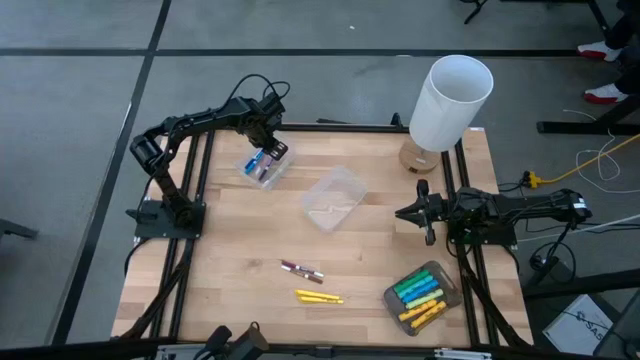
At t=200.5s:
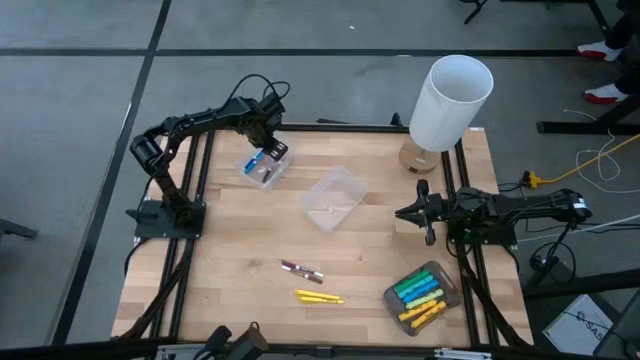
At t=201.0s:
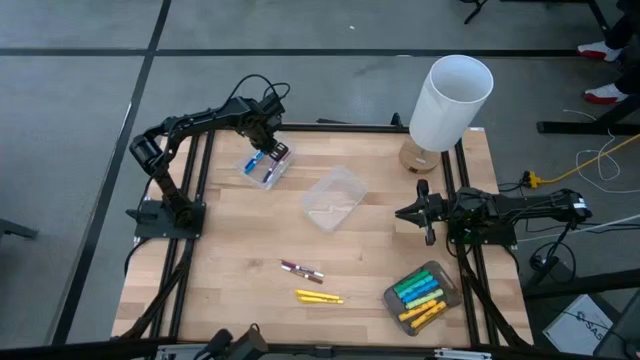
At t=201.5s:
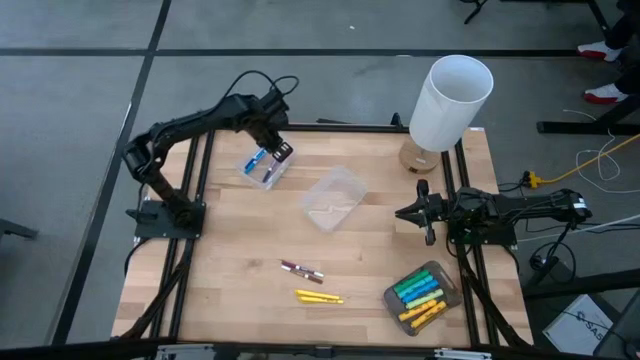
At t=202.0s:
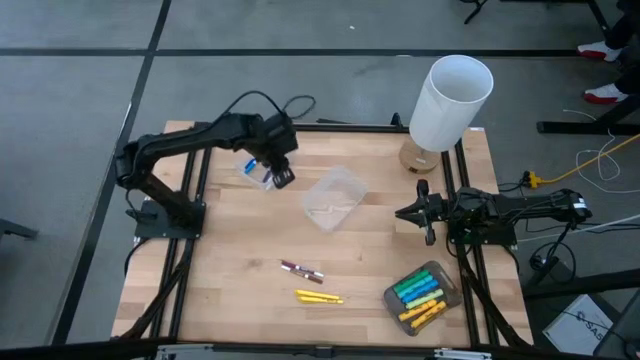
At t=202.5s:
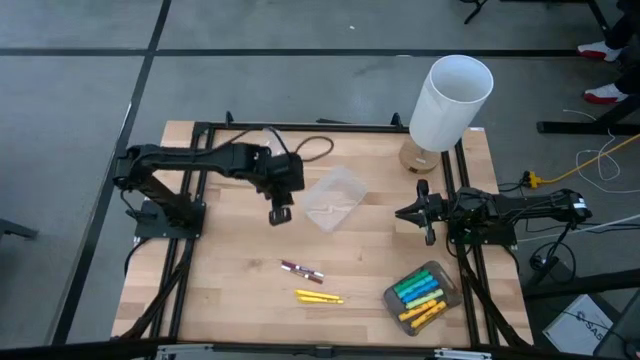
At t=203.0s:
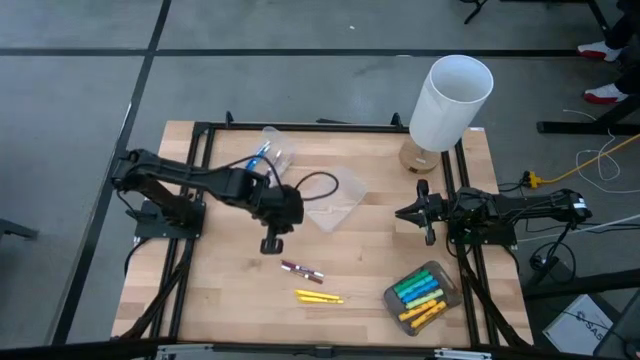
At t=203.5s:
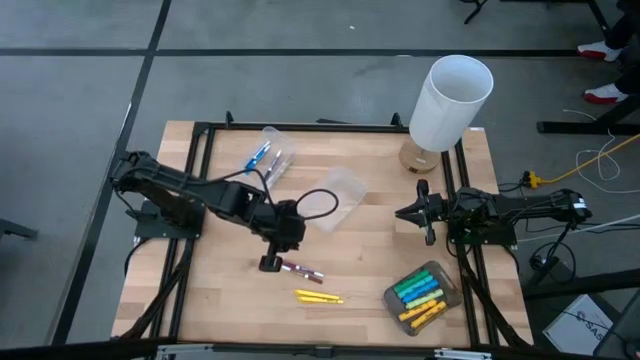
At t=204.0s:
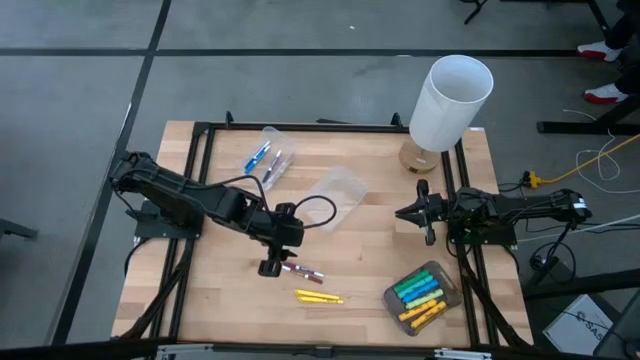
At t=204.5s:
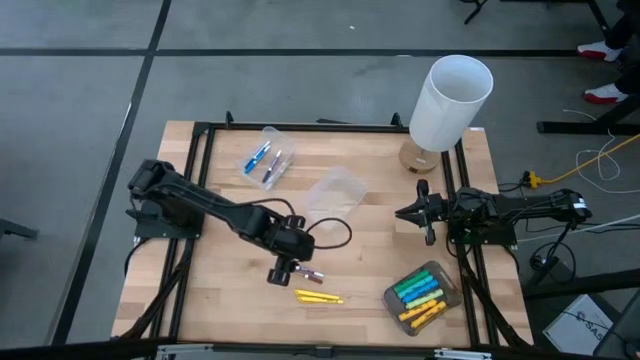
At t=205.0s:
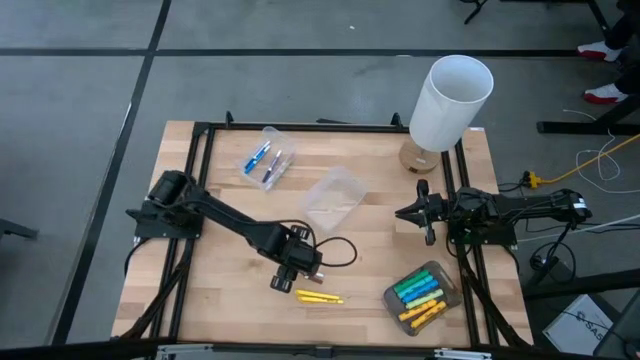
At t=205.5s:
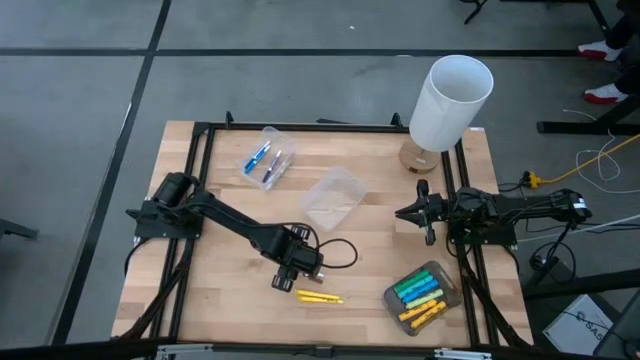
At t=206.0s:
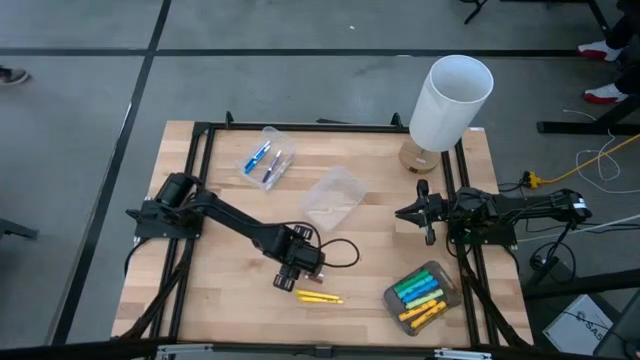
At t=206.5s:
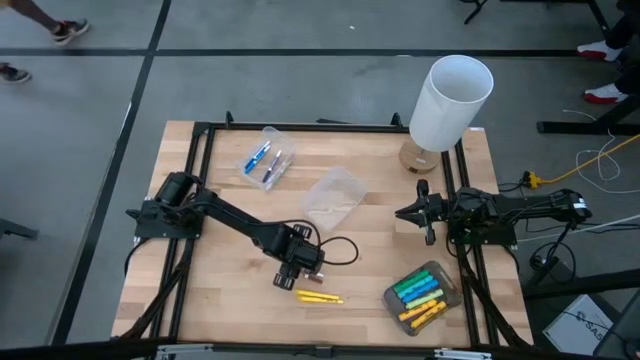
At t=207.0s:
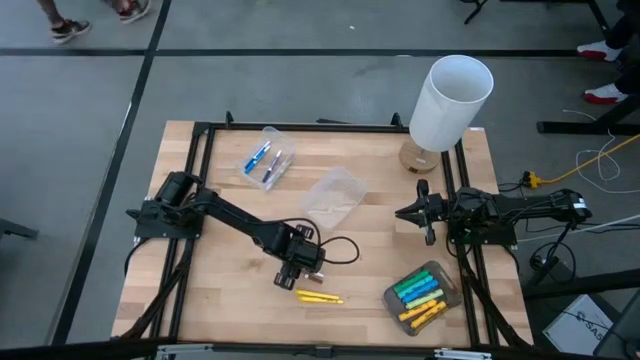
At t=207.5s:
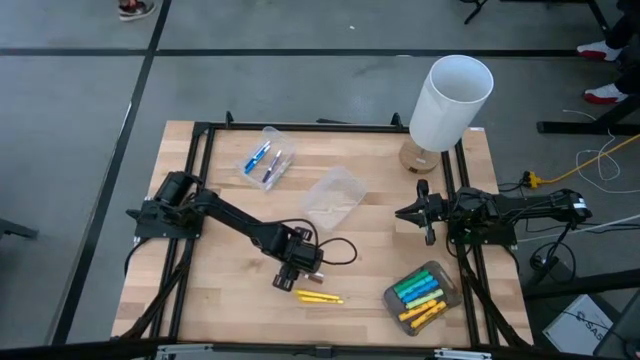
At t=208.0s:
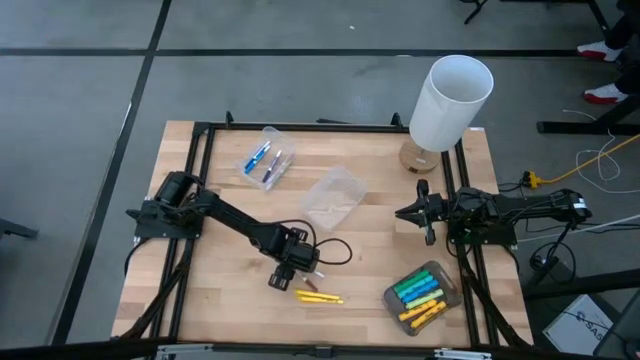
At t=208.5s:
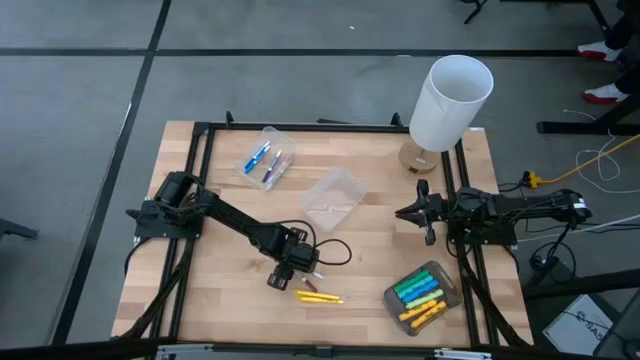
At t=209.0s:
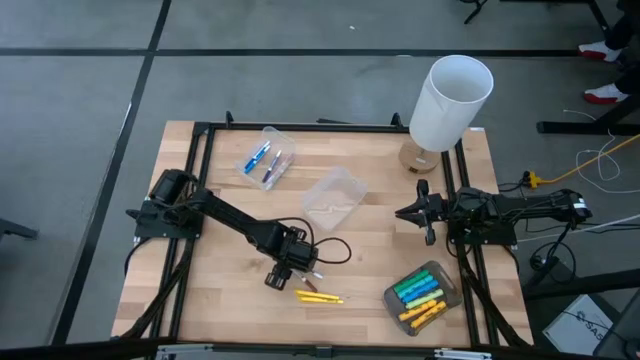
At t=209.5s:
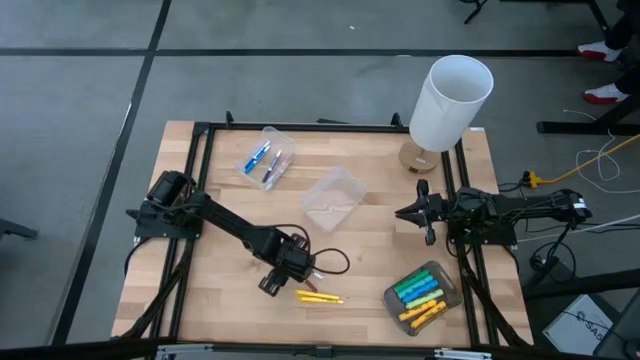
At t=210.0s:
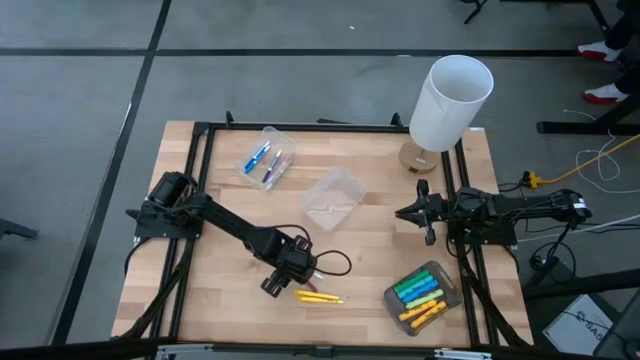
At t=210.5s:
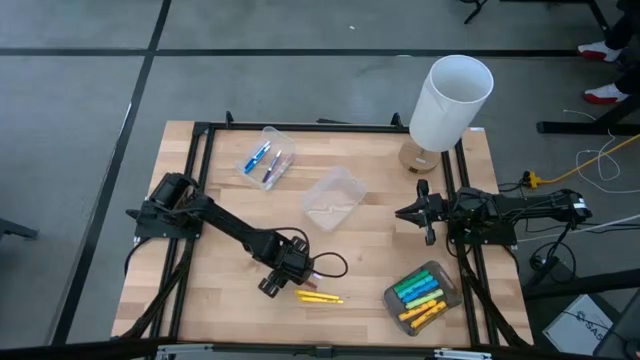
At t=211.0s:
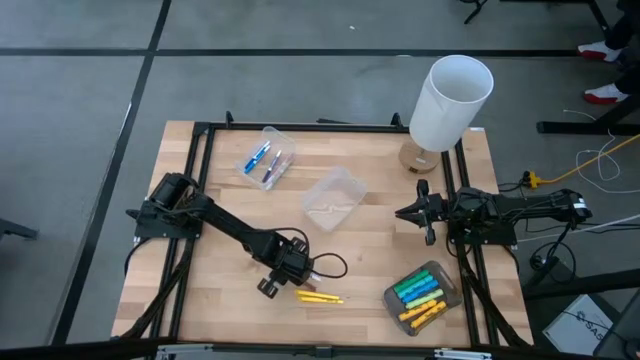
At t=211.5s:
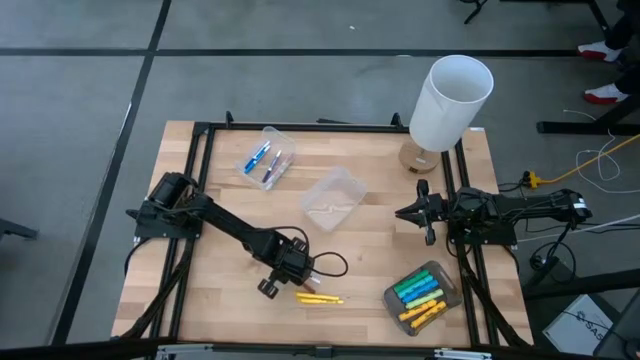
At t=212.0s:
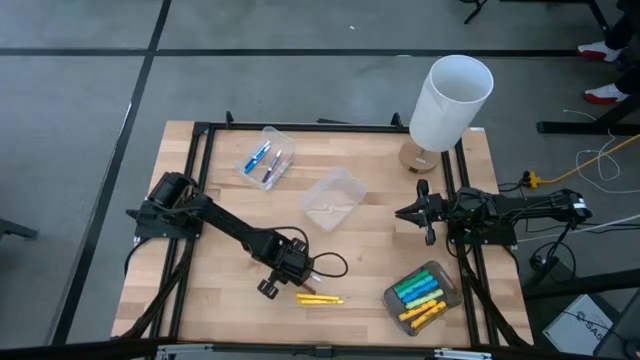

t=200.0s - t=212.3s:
Task: Pick & Place Markers
Put the brown marker into the transparent bin

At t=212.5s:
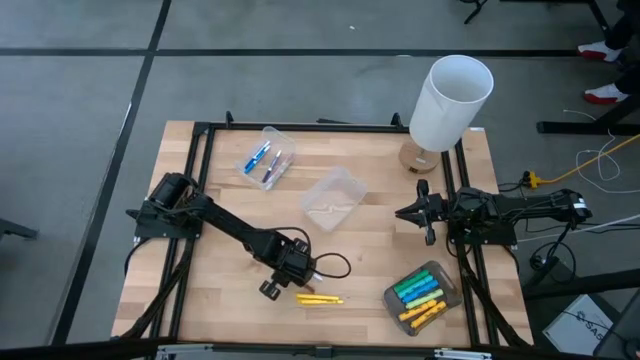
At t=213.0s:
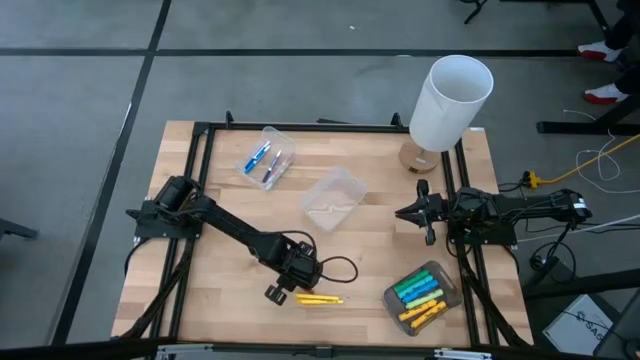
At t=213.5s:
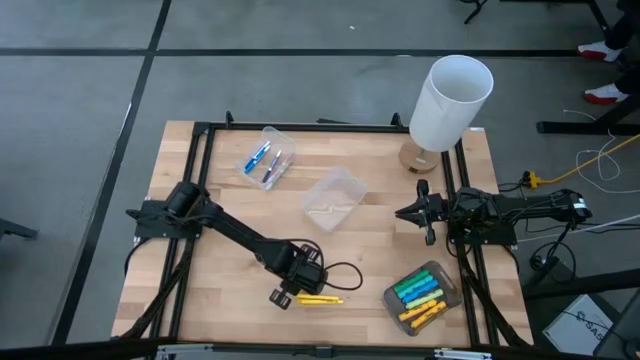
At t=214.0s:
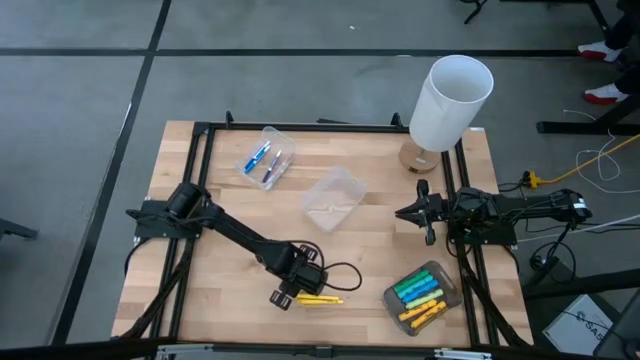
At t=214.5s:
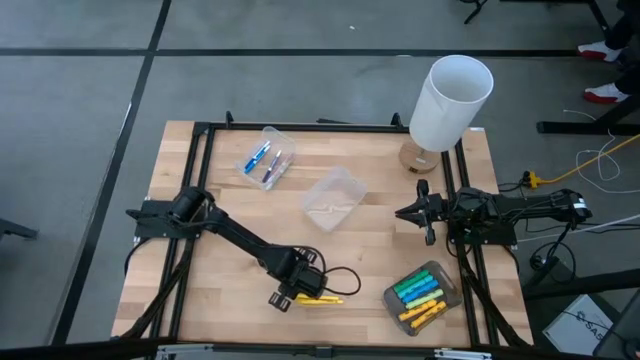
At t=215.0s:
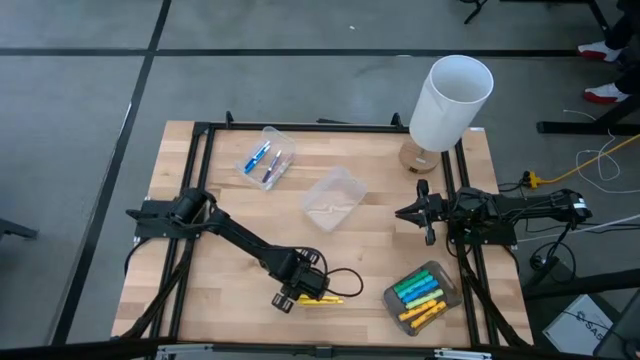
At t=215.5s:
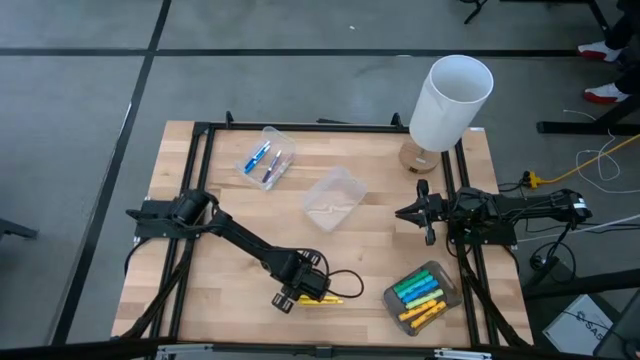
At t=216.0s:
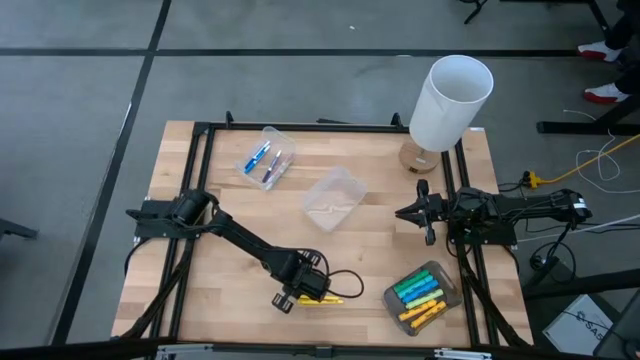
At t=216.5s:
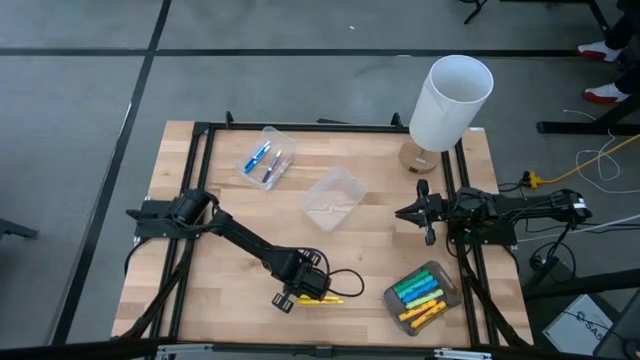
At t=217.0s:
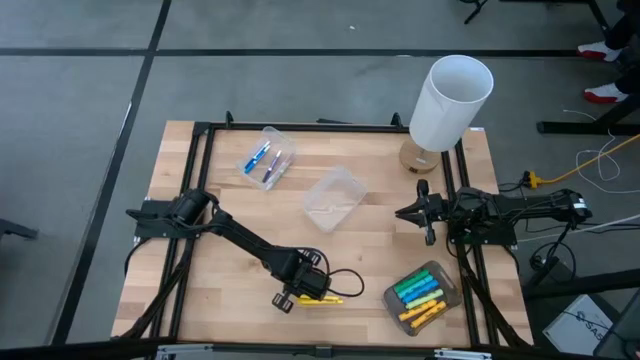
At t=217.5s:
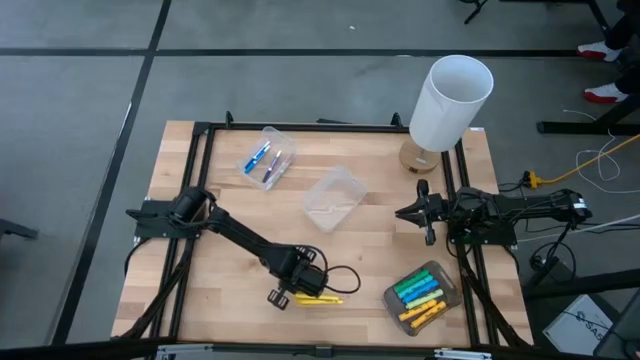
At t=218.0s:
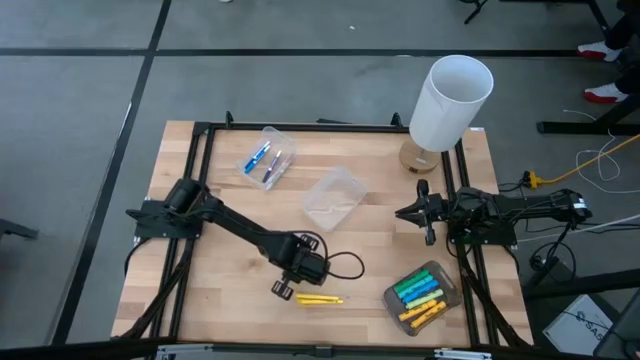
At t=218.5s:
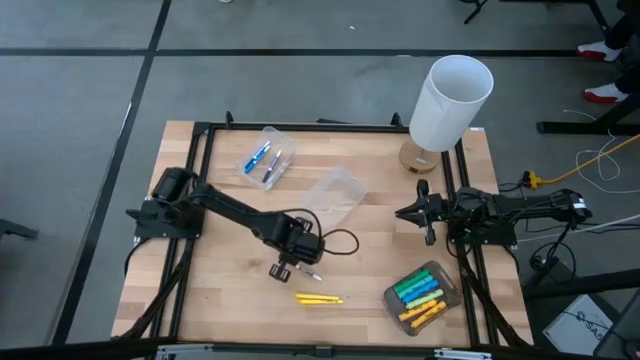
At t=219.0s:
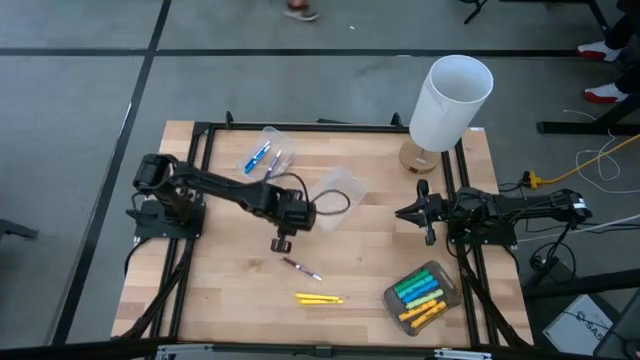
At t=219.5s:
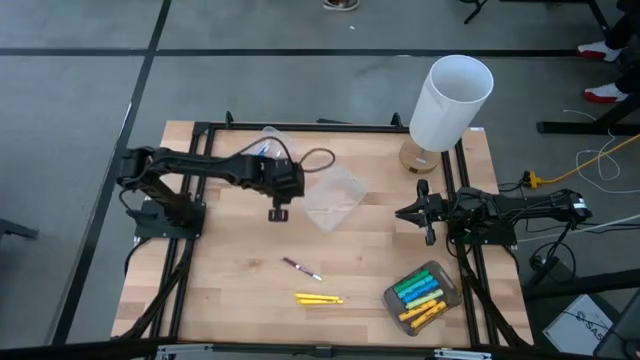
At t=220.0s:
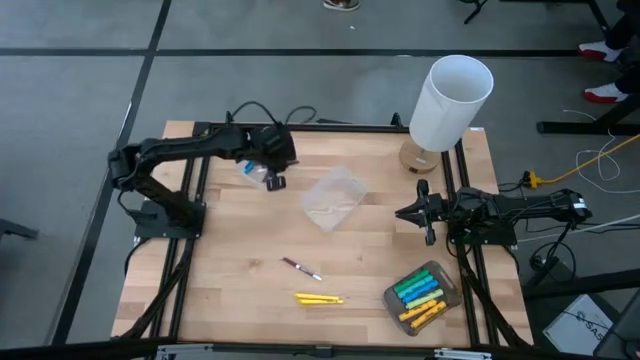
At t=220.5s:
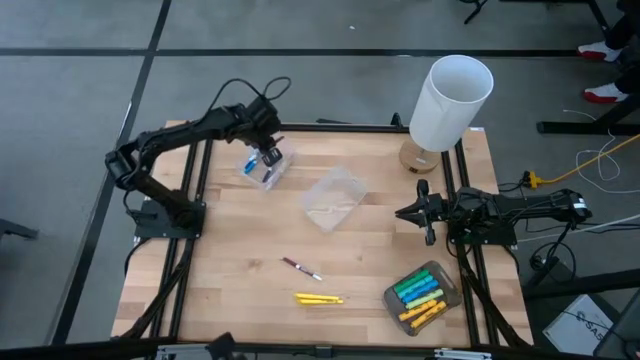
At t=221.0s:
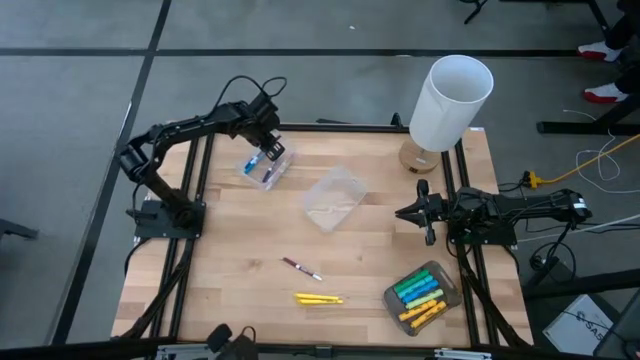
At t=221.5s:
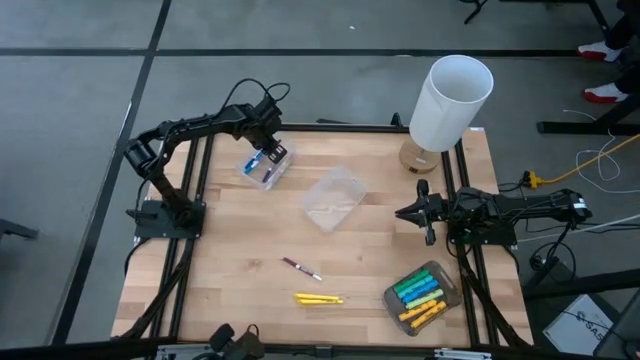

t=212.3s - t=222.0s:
Put the brown marker into the transparent bin
